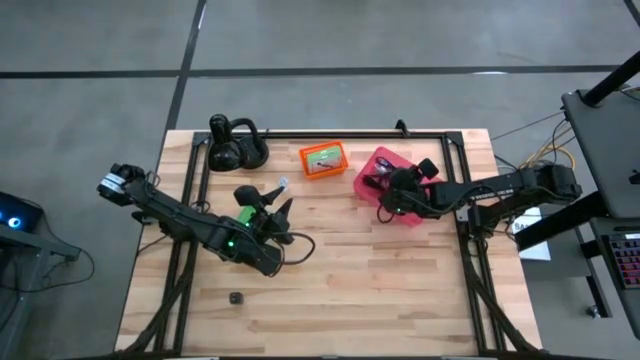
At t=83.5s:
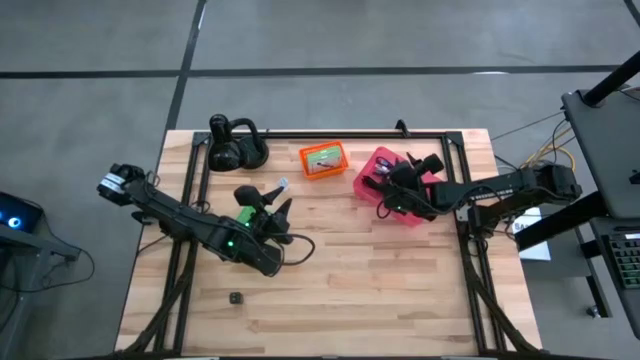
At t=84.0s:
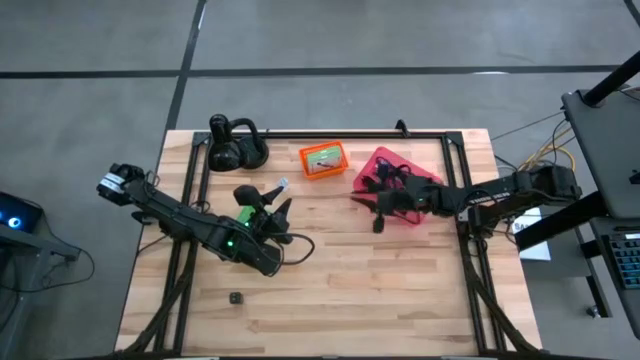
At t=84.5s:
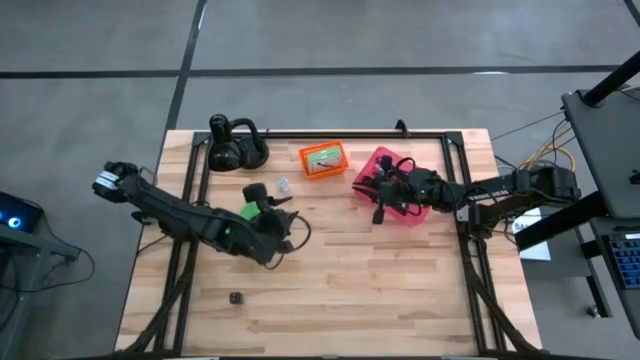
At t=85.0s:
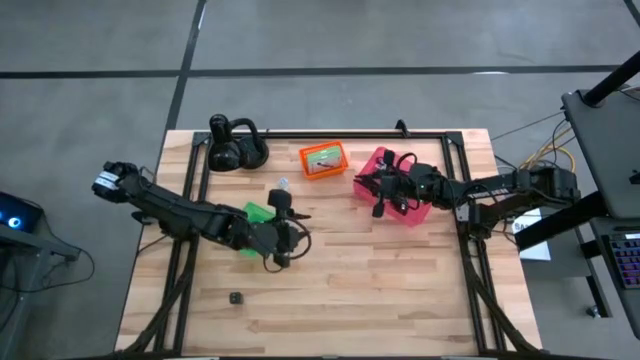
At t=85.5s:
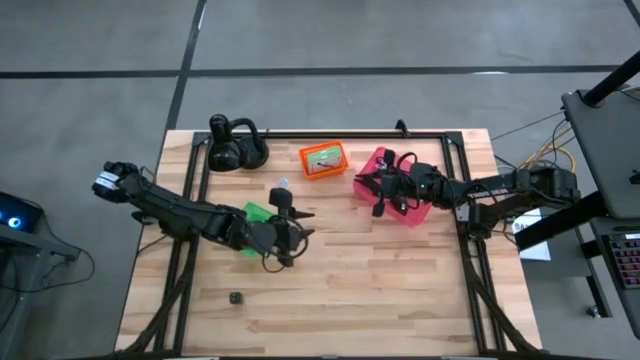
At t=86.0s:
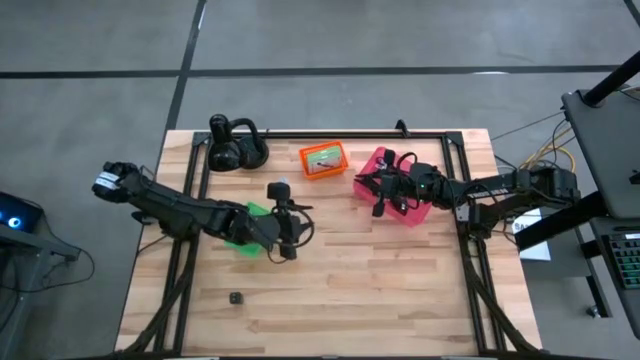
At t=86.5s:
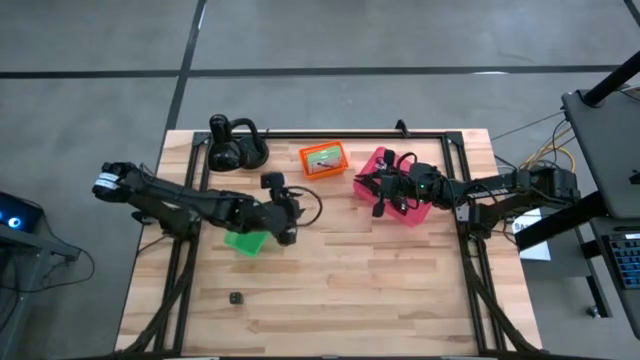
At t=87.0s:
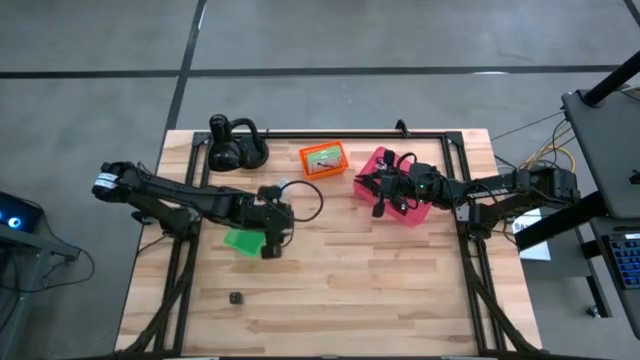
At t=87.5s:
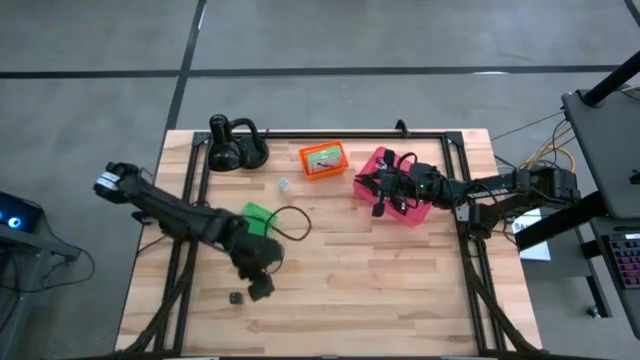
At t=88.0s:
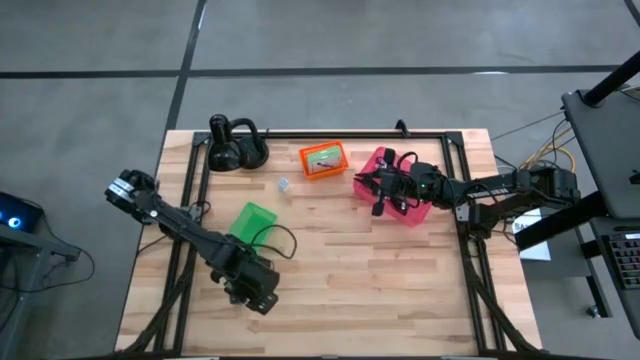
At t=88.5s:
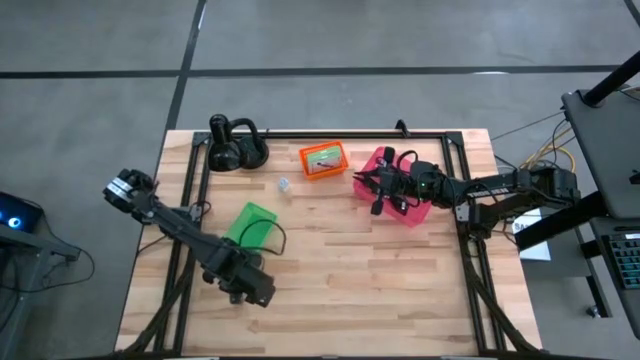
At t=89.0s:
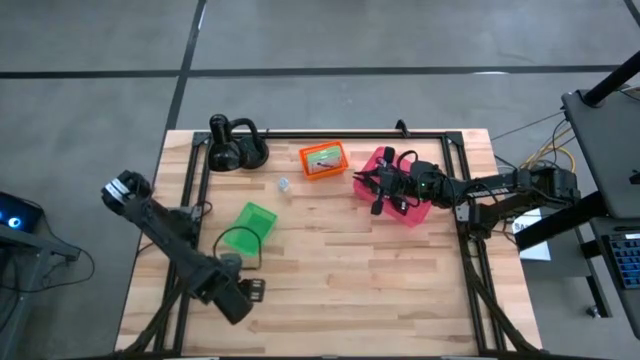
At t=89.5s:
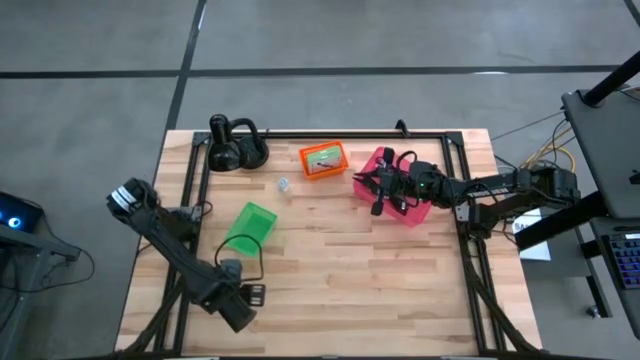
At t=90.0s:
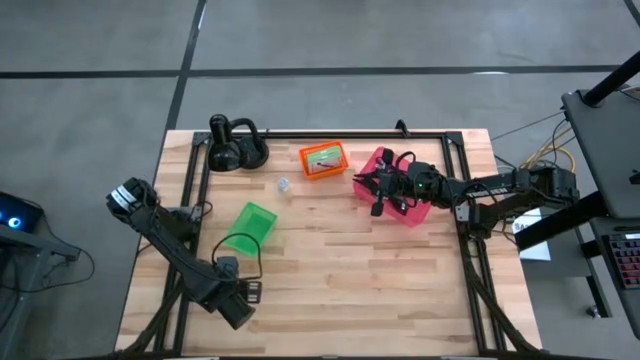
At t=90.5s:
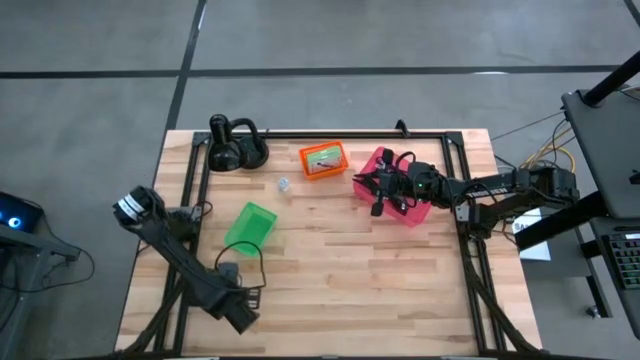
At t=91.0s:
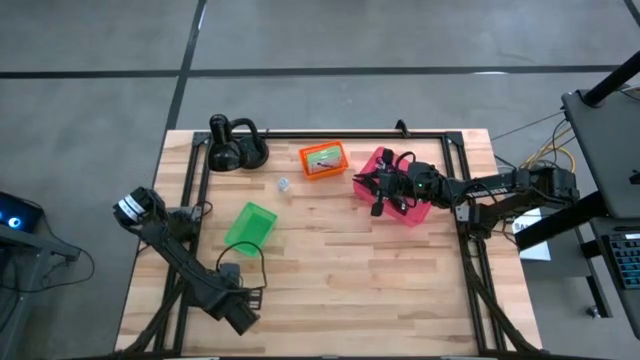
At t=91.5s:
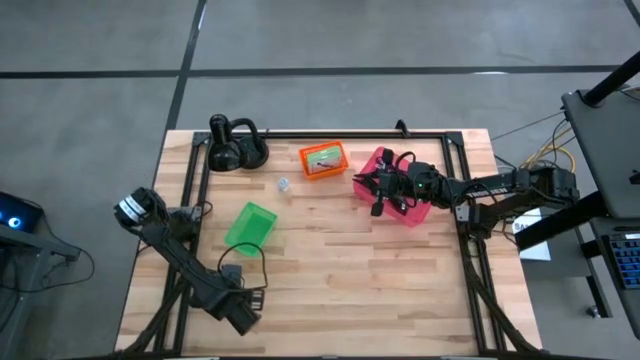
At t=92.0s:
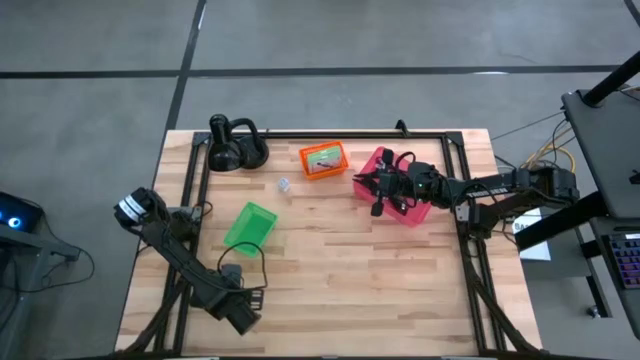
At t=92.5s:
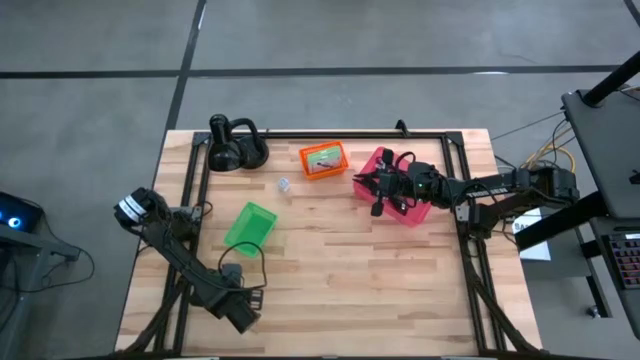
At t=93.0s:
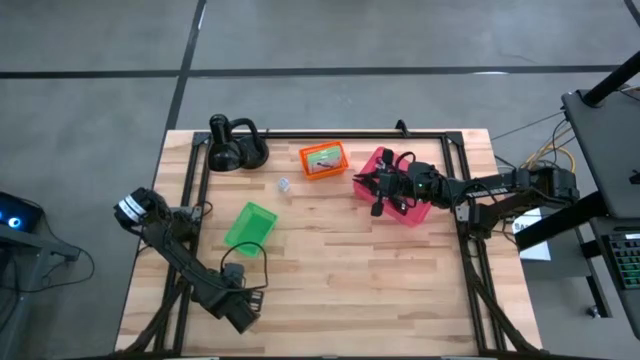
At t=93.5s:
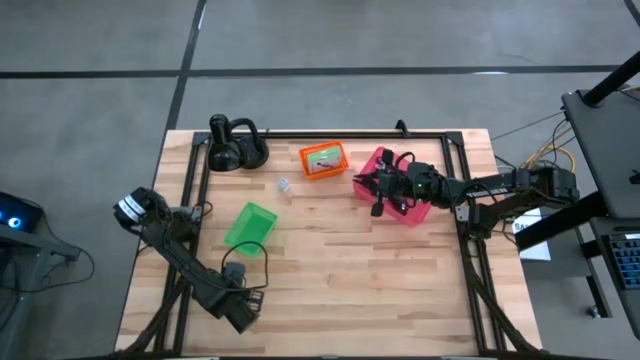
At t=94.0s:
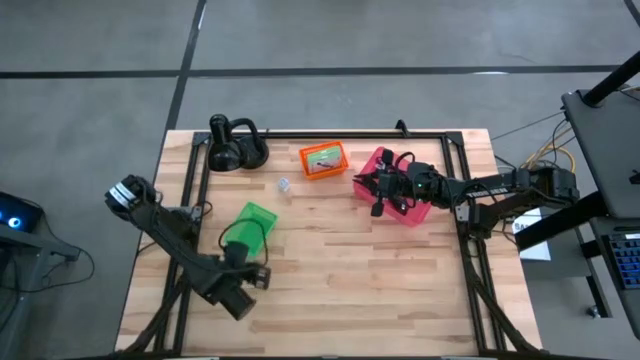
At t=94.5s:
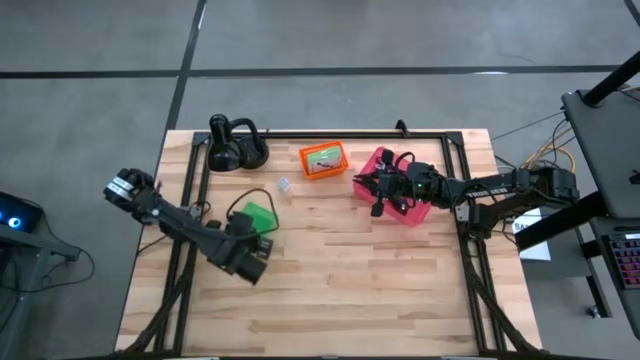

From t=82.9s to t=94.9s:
Task: Pick and place items into bin
Put the black charger adapter into the green basket

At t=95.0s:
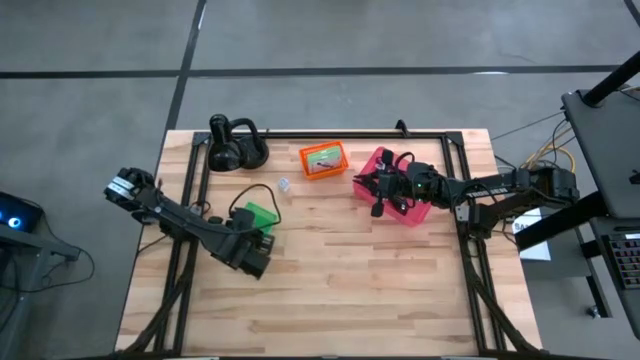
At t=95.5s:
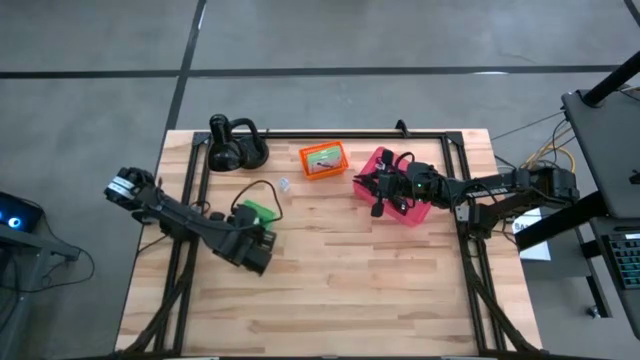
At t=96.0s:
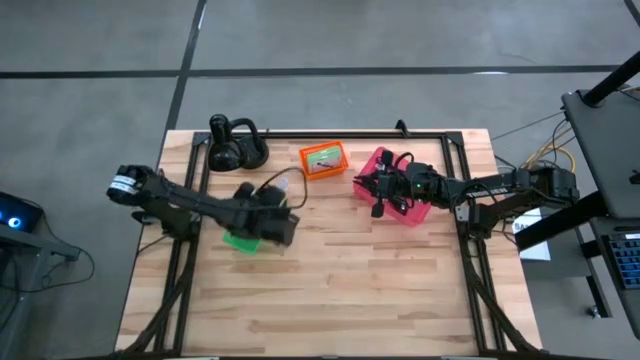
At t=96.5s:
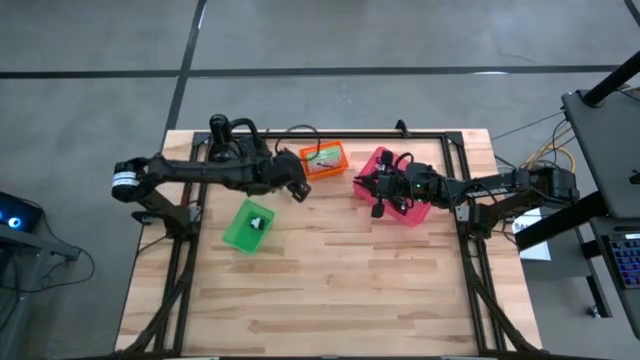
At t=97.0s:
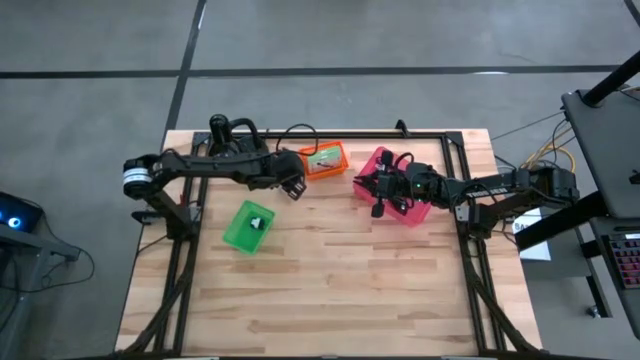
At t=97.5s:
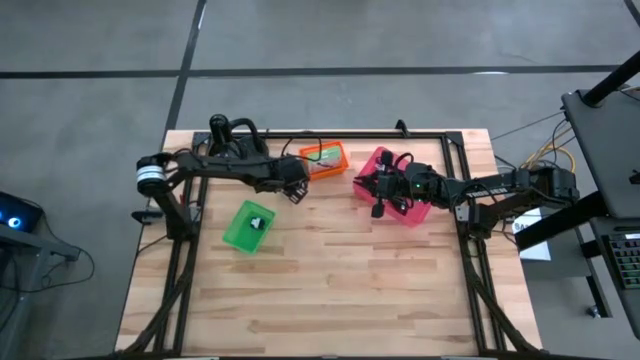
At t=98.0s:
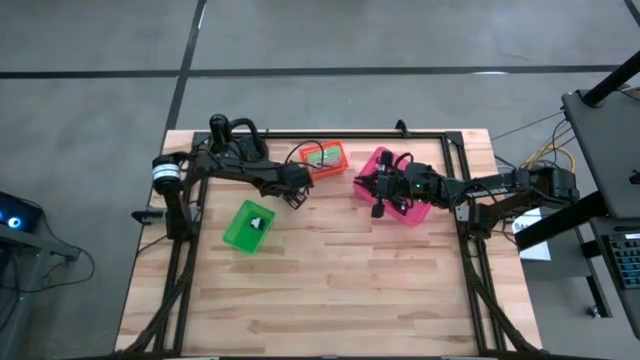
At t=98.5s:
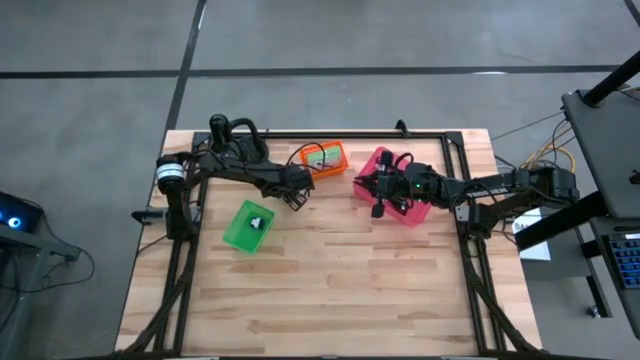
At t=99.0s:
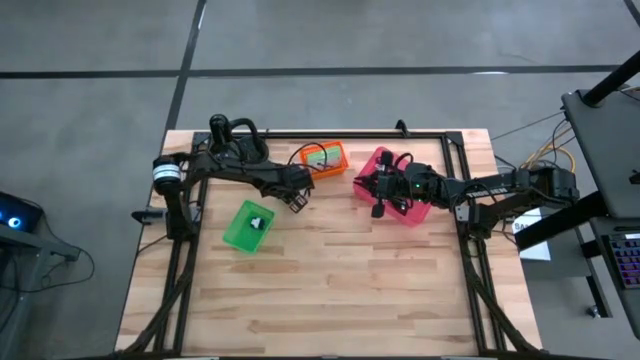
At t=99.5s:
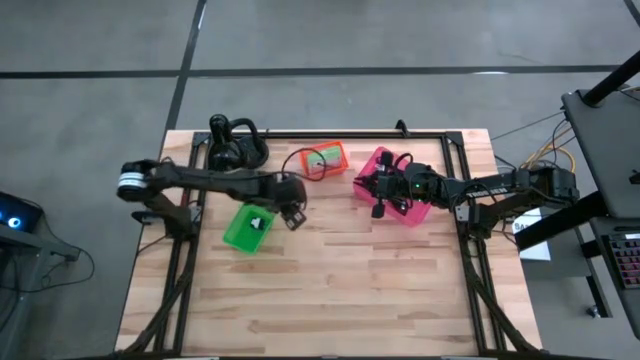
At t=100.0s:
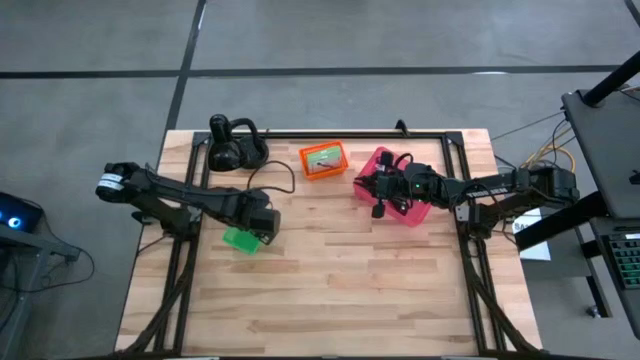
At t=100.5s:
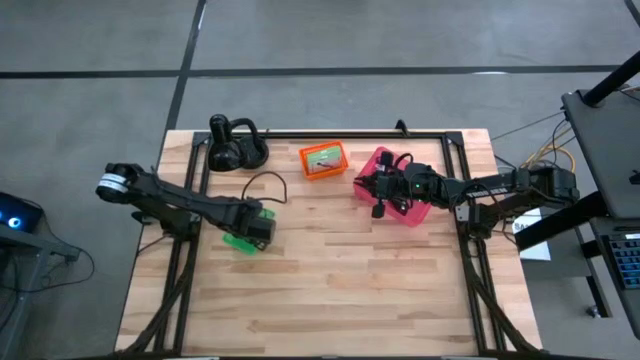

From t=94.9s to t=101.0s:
Put the white charger adapter into the green basket

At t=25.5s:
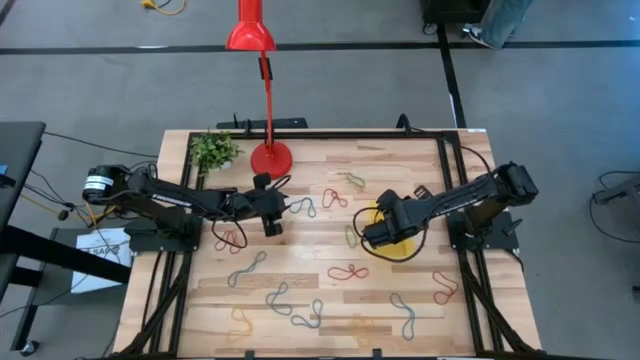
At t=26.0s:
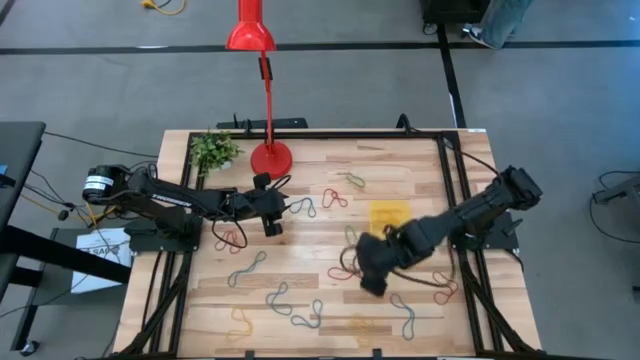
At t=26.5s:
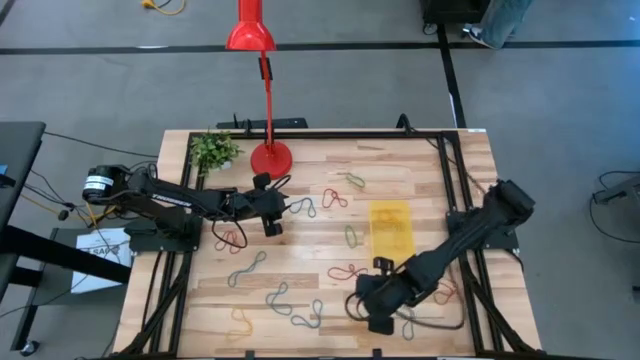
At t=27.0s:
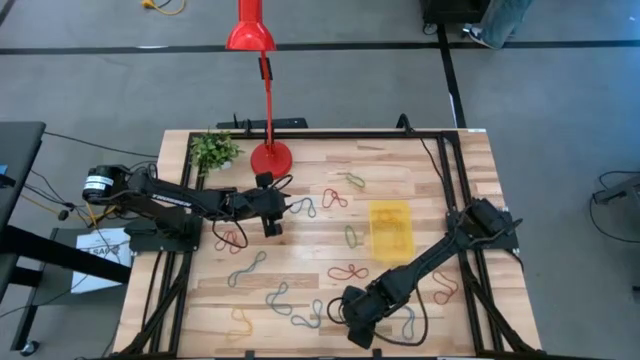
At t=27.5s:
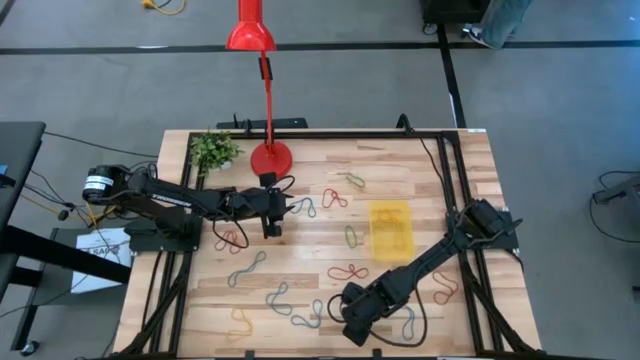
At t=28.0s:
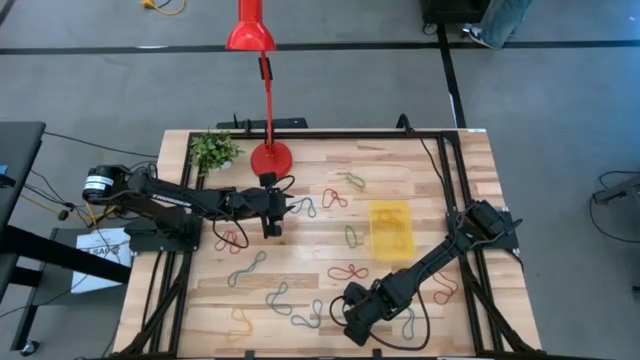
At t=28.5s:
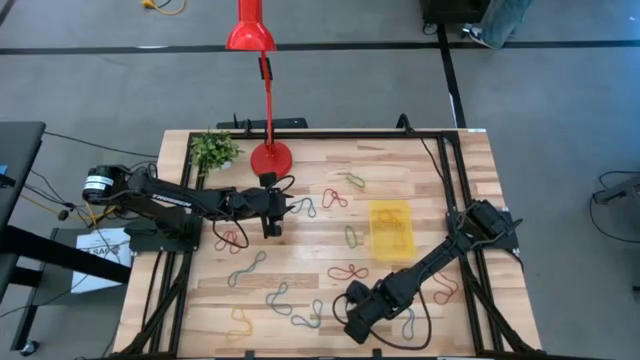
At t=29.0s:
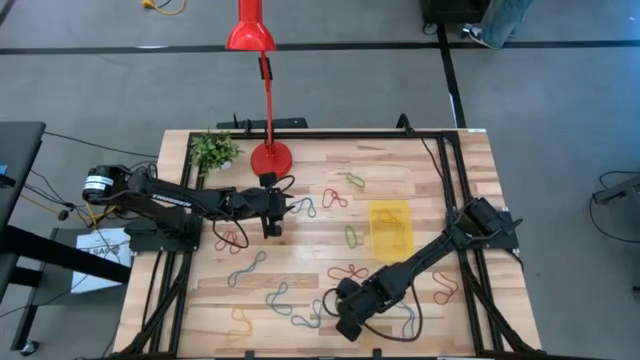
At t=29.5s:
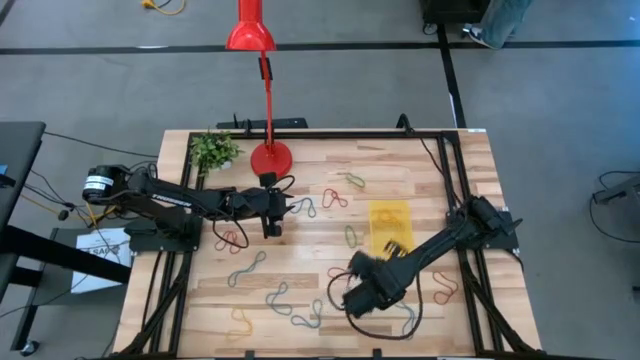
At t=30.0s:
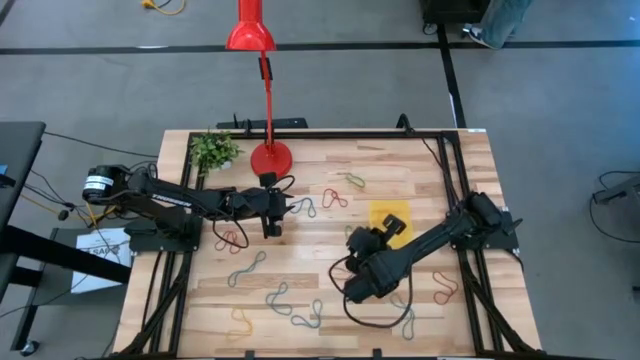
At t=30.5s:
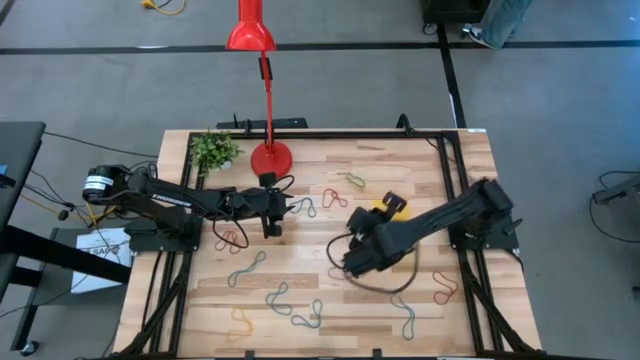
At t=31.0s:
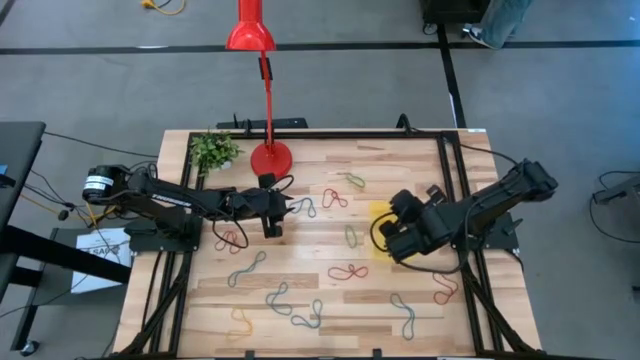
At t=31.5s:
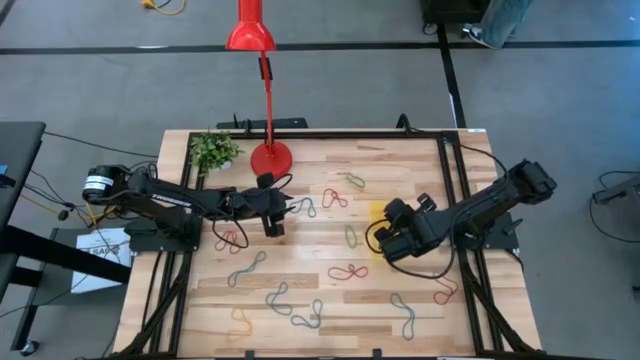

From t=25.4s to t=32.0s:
Task: Pick and place items into bin
Put the yellow rubber band into the yellow bin
